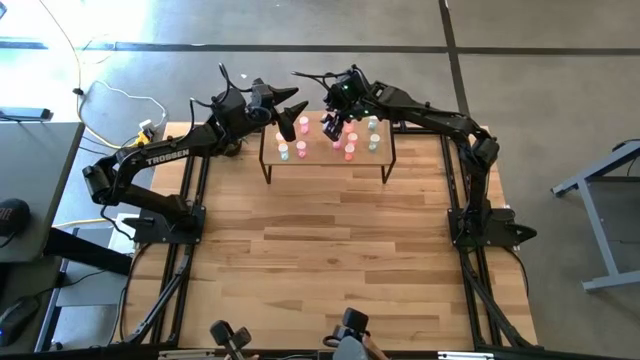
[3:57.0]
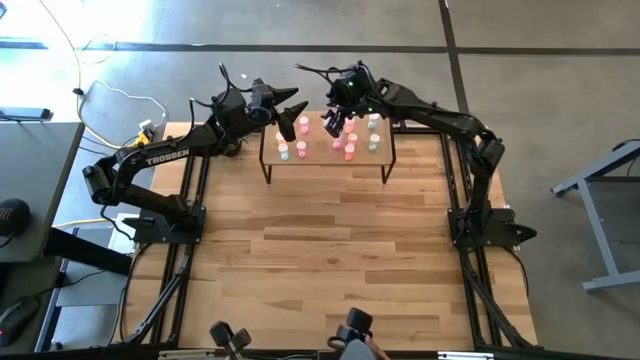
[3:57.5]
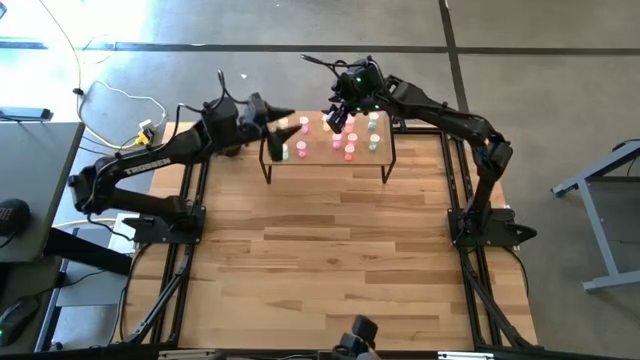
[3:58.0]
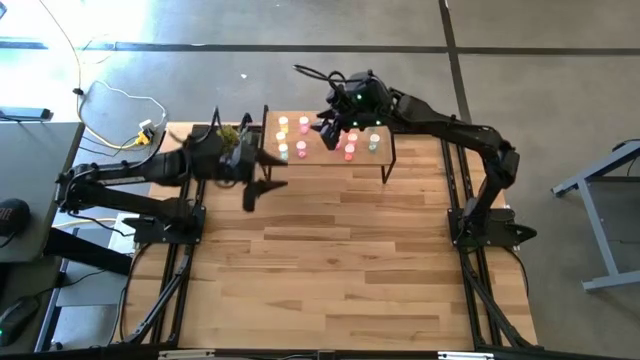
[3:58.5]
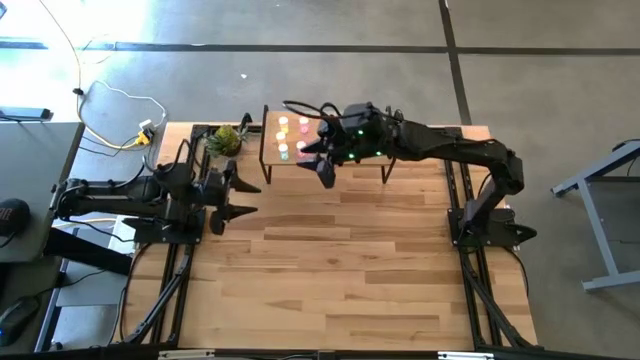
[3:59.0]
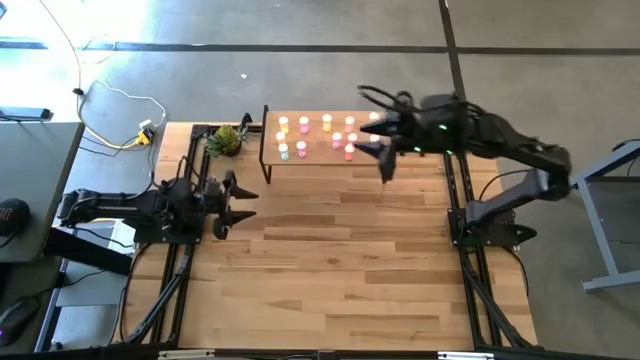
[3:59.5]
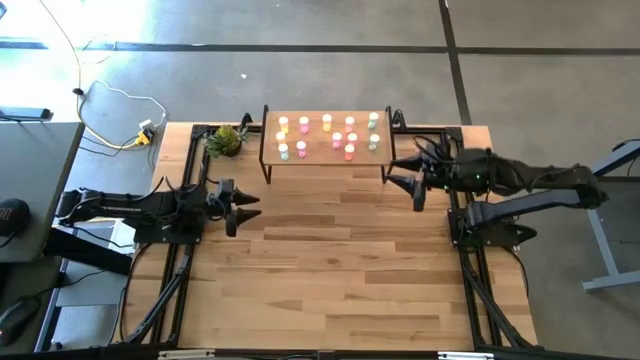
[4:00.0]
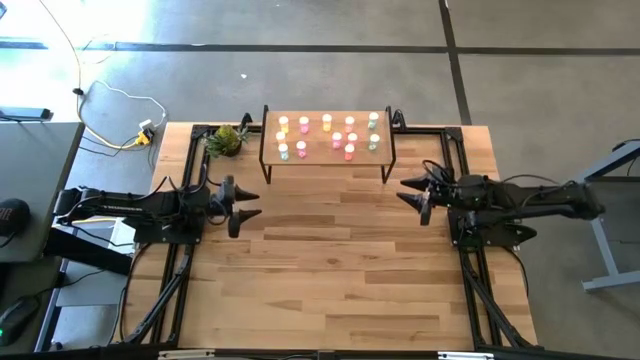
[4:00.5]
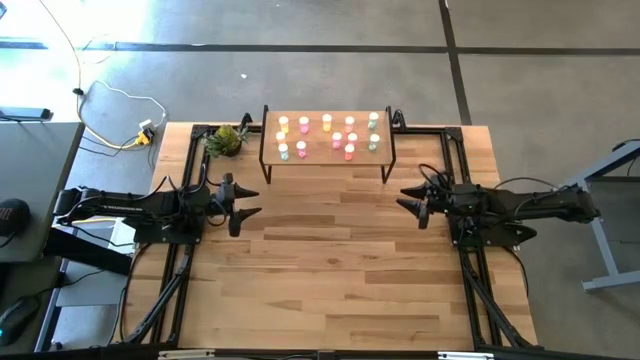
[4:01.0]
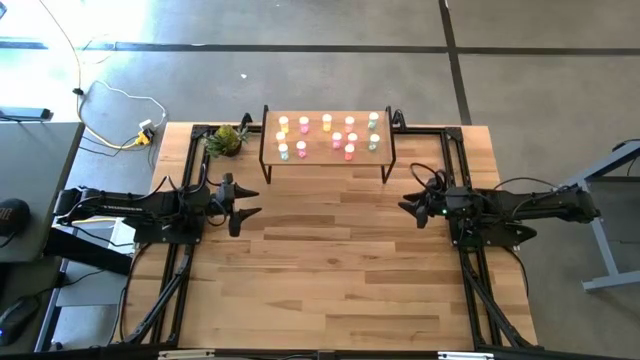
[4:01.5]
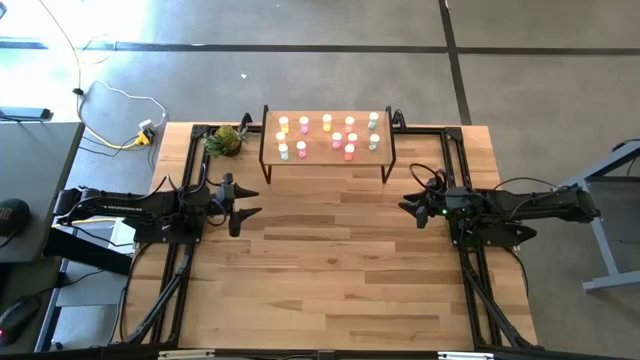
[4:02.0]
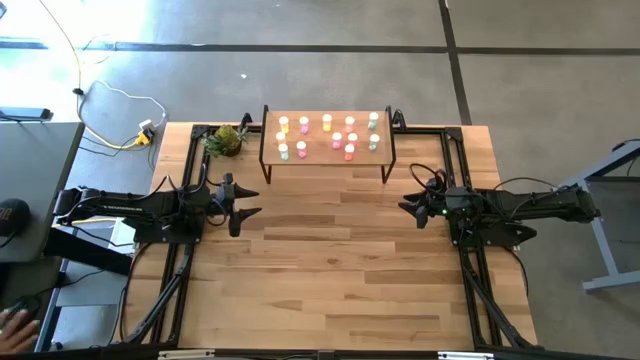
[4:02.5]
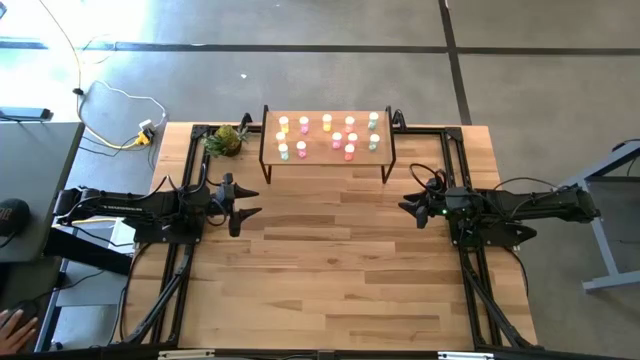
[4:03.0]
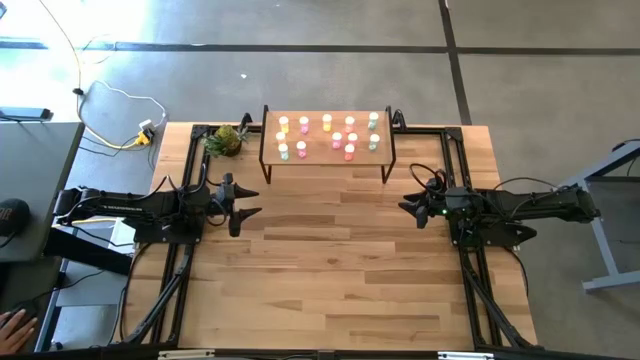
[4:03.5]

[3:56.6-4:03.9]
Task: Pick and place medicine bottles onto shelf by color
Return to Home Position

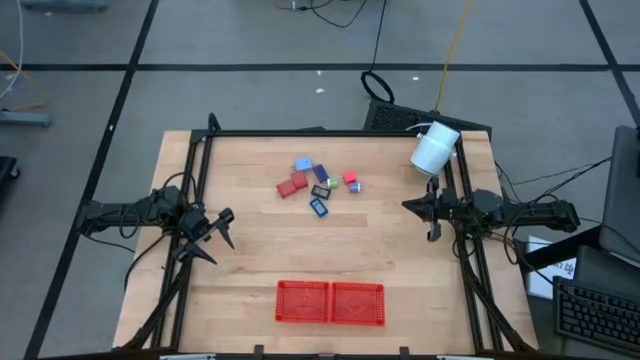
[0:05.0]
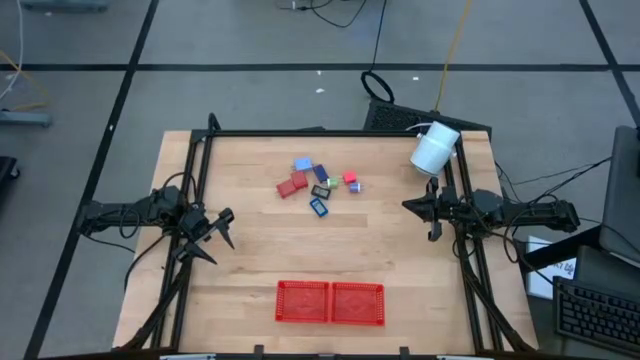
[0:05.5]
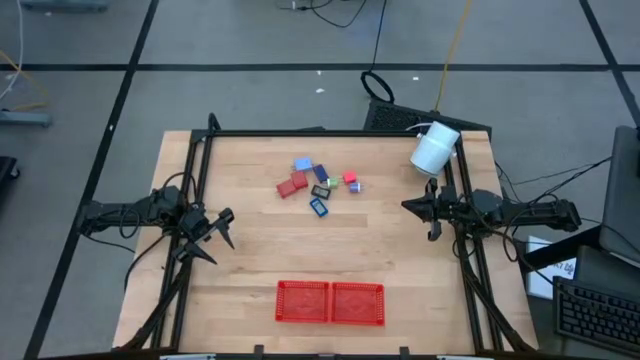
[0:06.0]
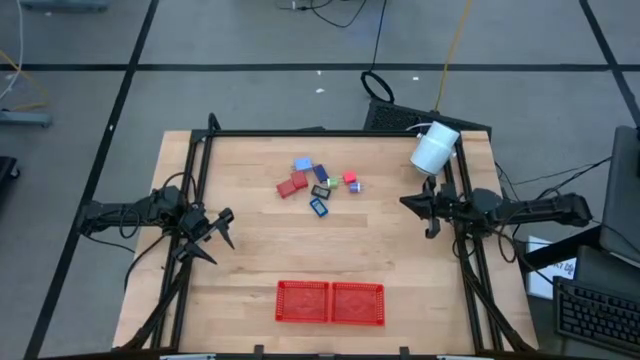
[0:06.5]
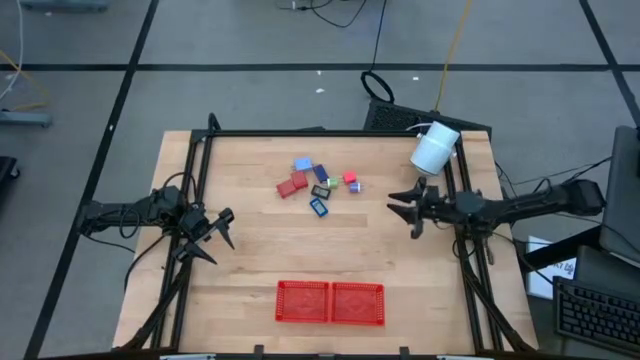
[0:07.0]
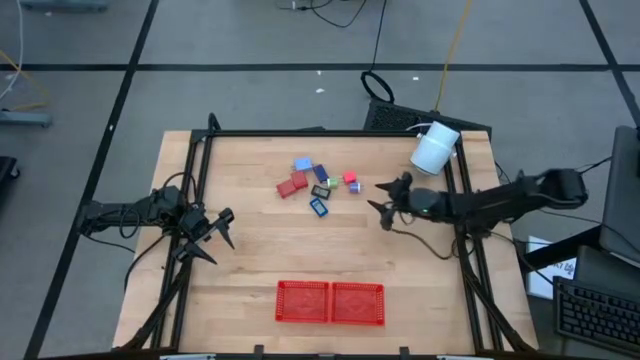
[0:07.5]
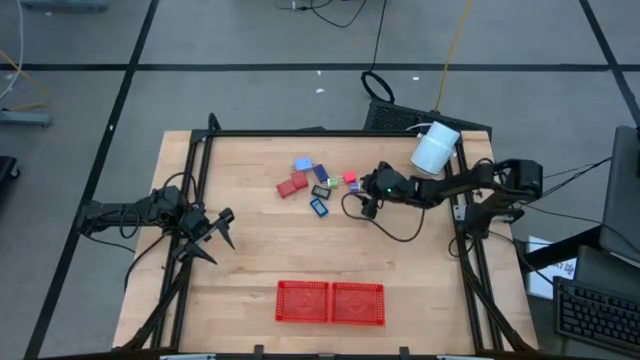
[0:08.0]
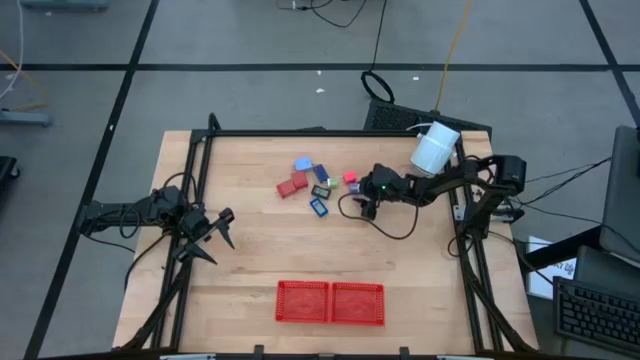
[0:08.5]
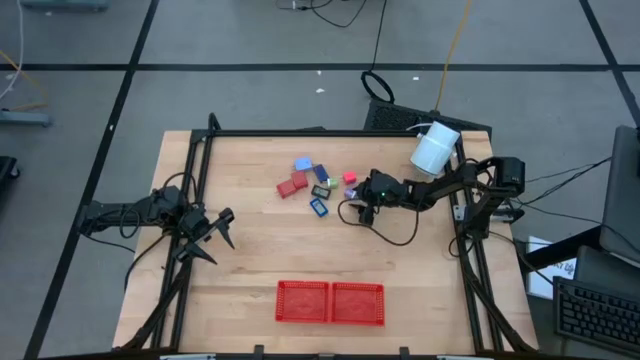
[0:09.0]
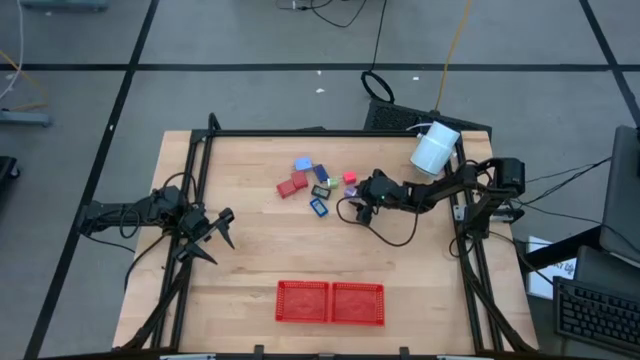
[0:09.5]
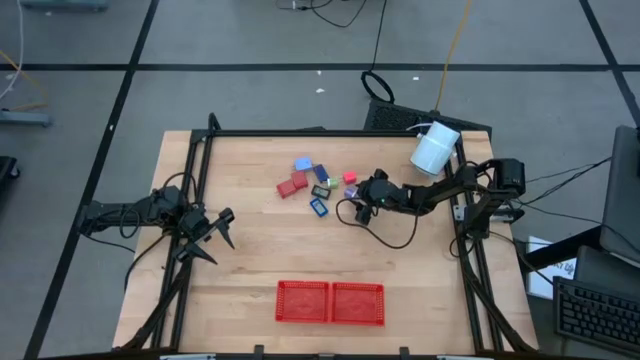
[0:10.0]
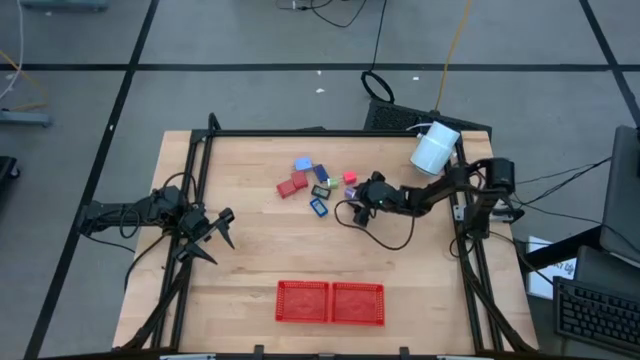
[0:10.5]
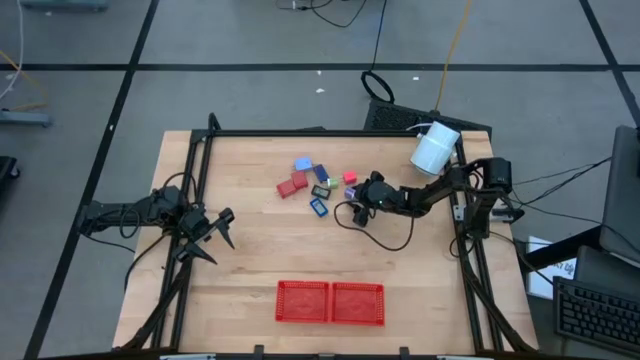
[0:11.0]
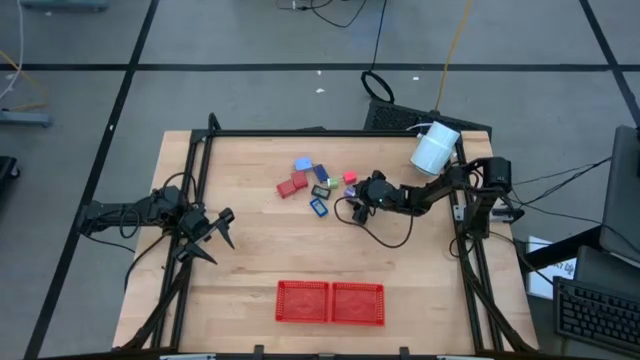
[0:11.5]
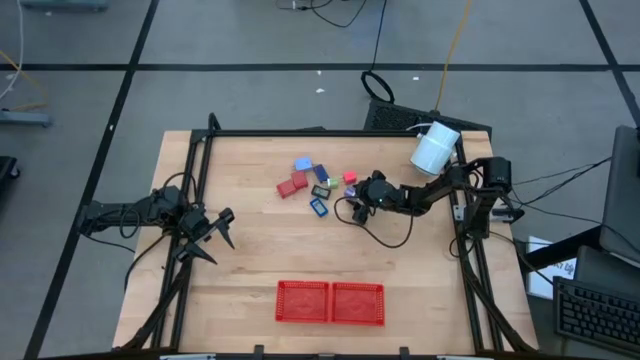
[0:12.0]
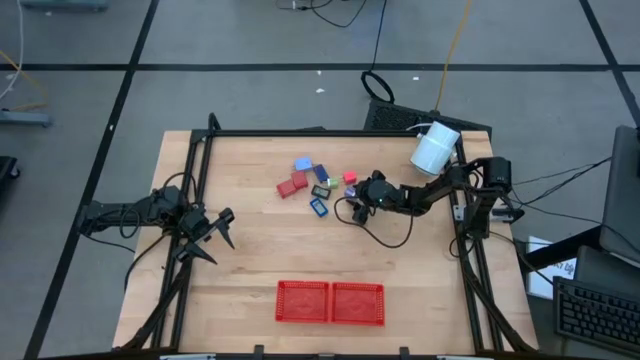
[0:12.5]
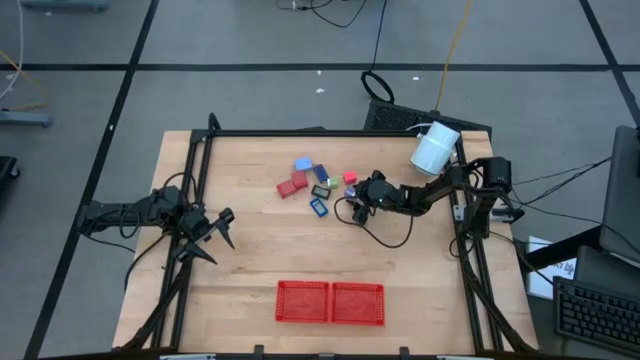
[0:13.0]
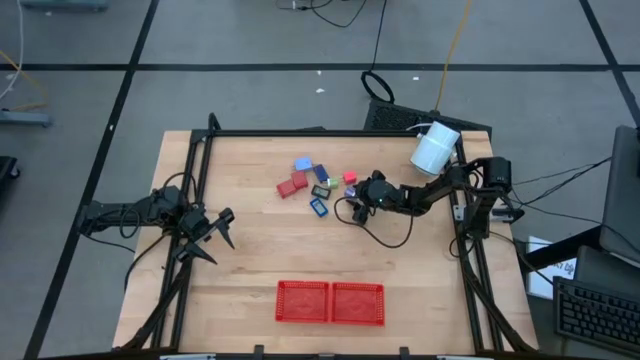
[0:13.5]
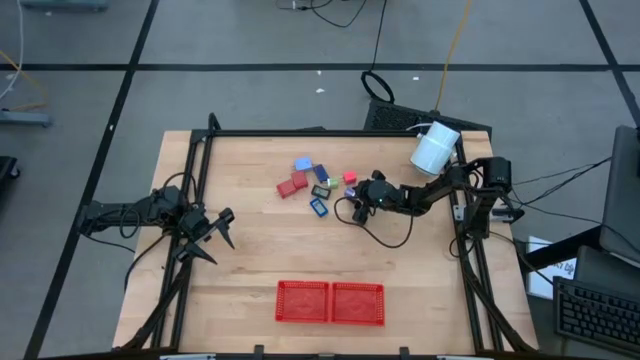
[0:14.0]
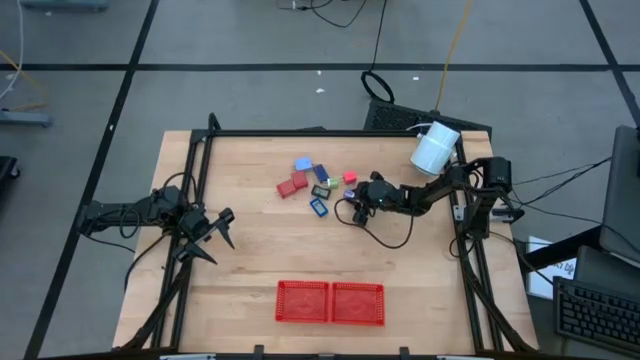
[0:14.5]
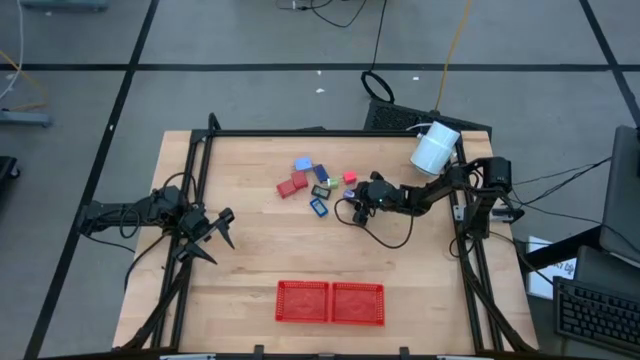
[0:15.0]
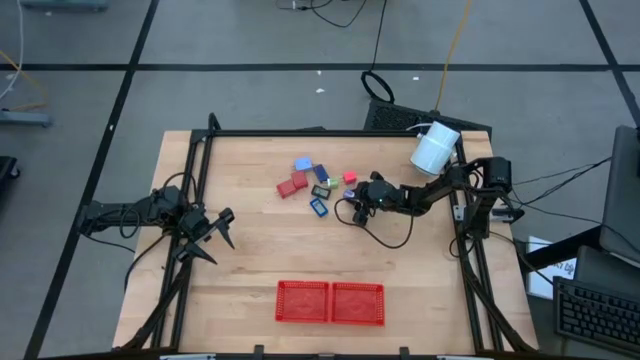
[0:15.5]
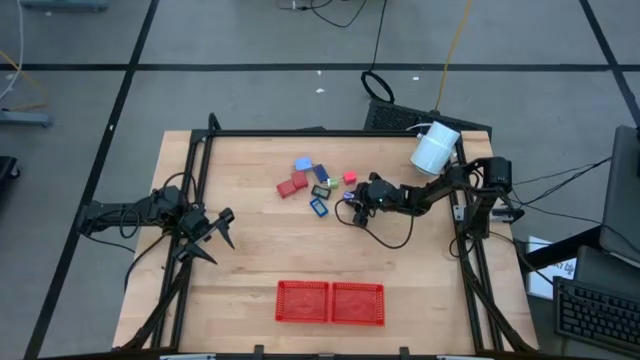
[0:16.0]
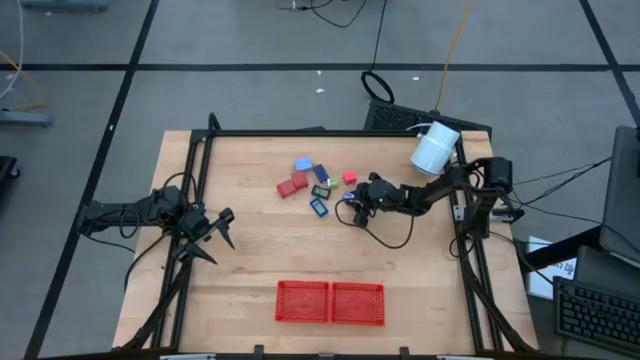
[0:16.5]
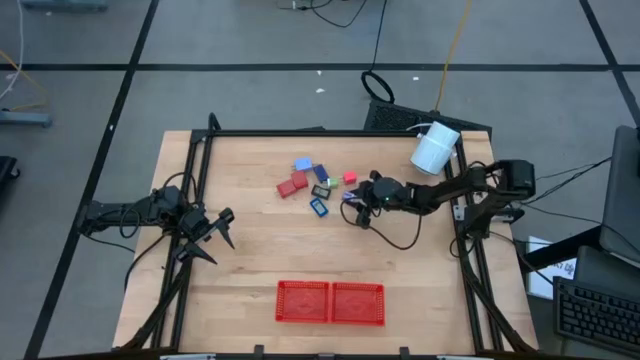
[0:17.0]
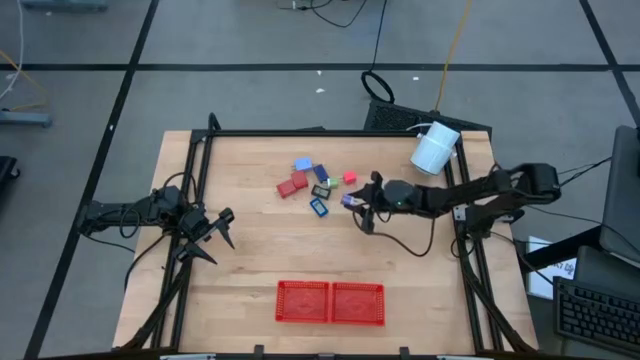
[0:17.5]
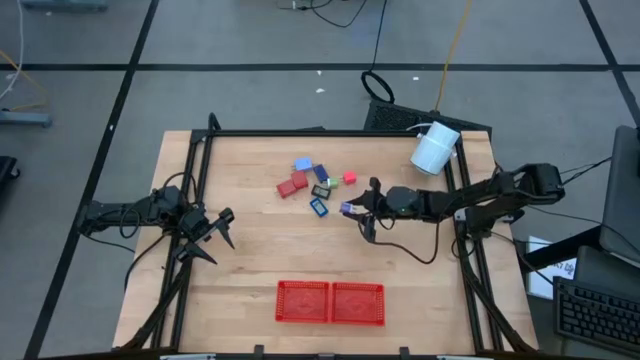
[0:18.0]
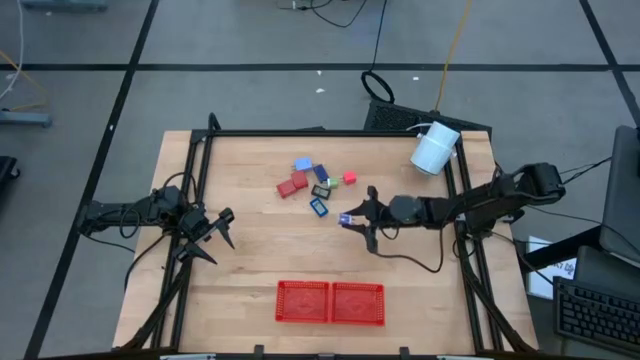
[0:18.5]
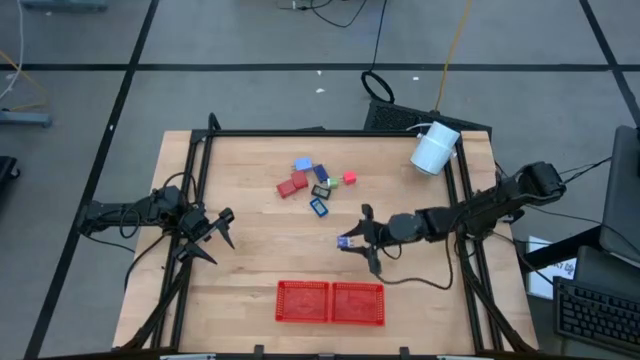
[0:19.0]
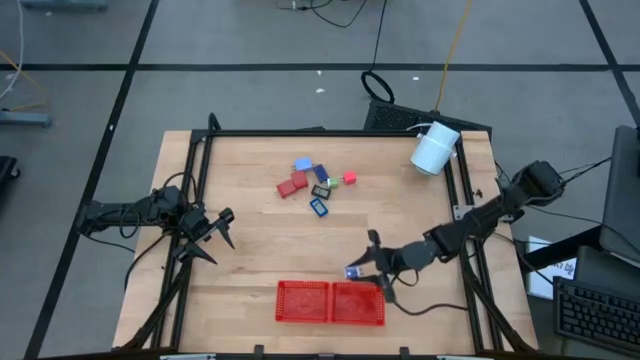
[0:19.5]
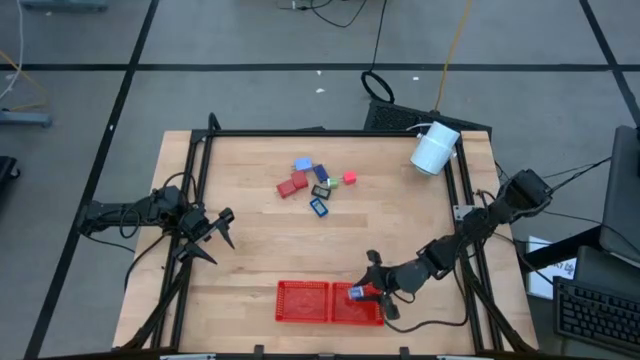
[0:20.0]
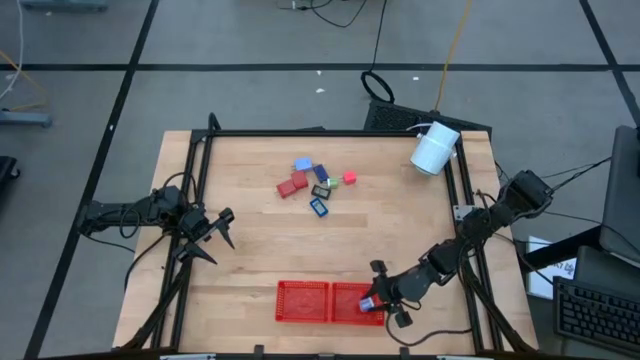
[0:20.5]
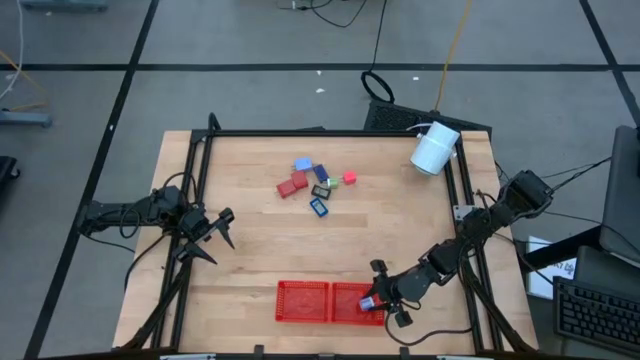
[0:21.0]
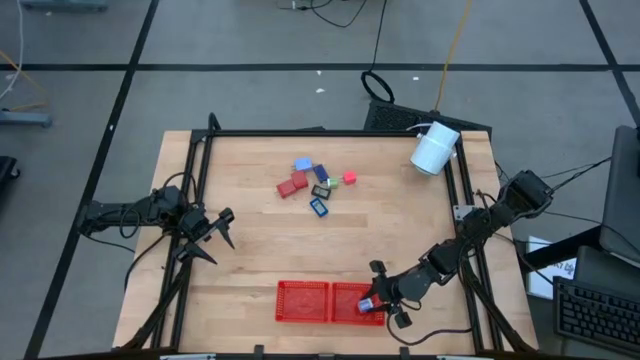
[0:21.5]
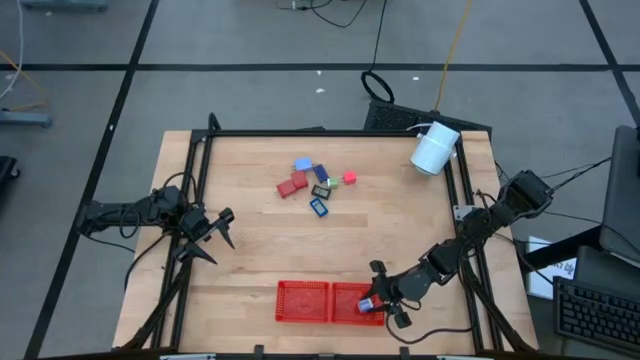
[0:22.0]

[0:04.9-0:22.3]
Task: Pick & Place Office items
Put the blue charger adapter into the right red bin
